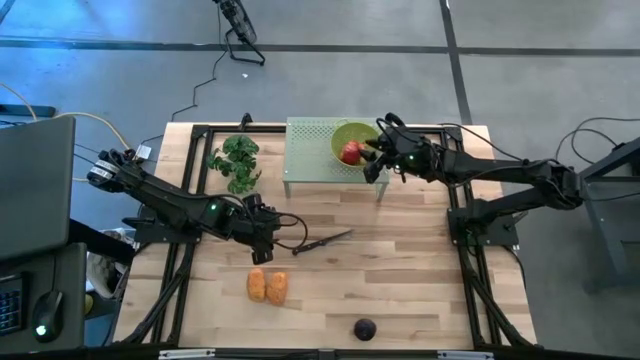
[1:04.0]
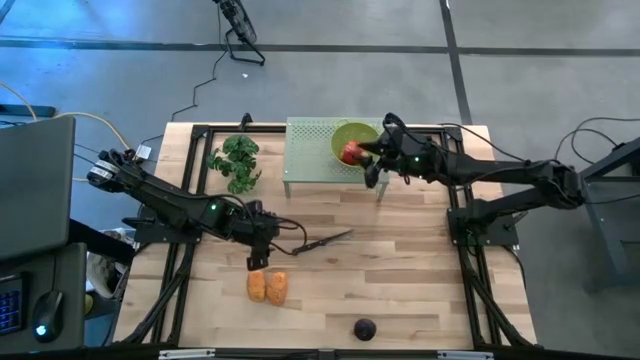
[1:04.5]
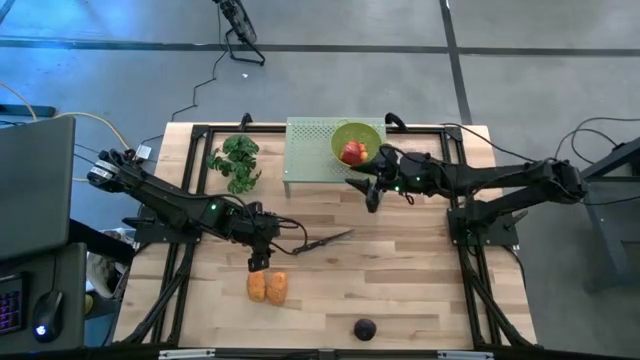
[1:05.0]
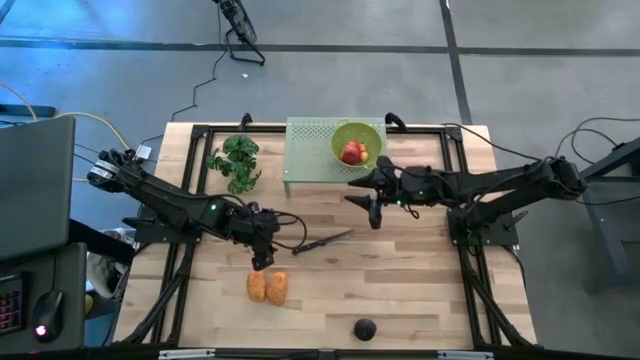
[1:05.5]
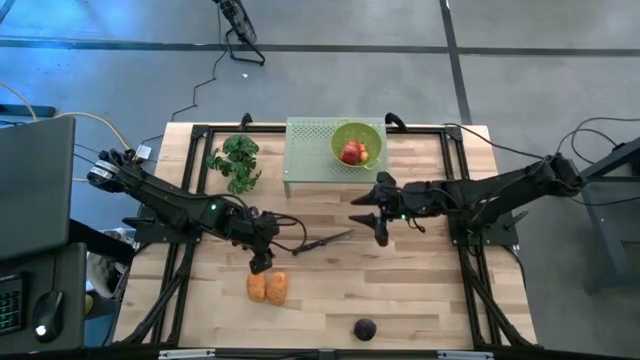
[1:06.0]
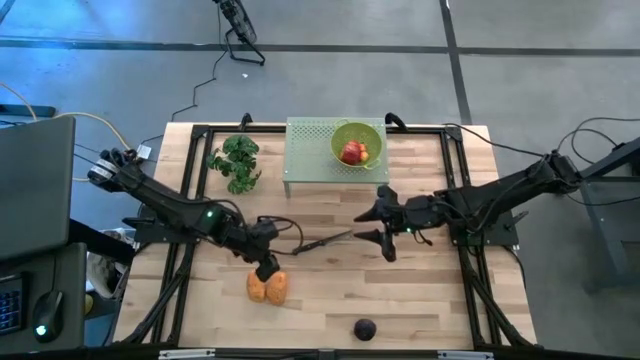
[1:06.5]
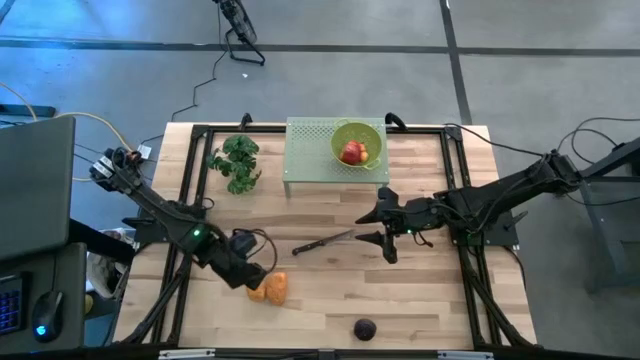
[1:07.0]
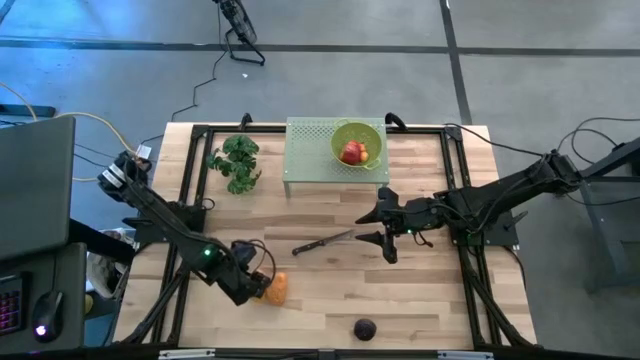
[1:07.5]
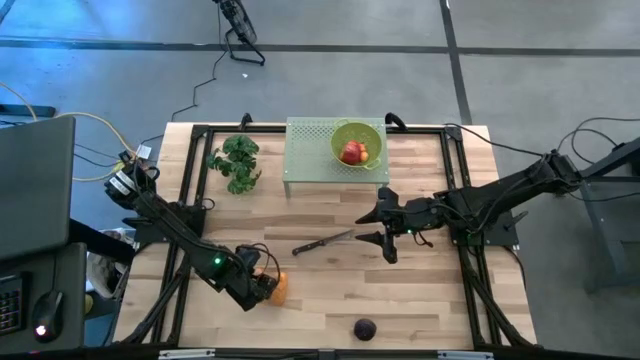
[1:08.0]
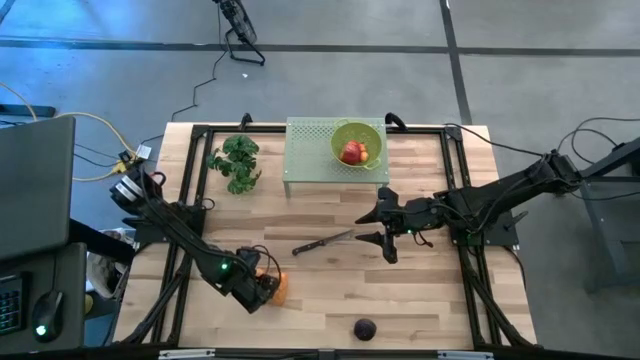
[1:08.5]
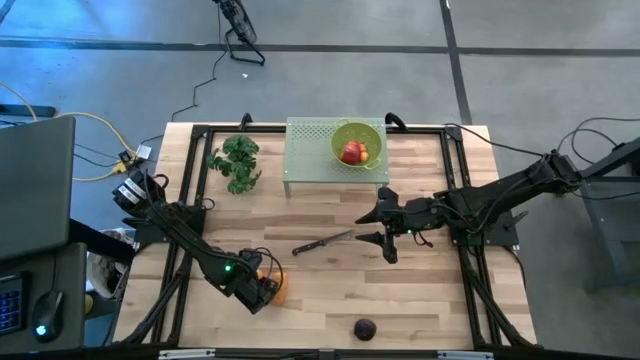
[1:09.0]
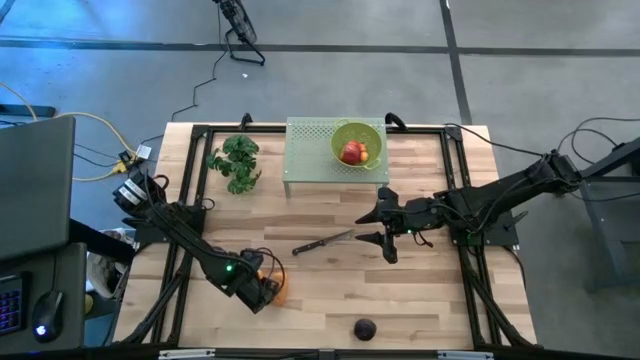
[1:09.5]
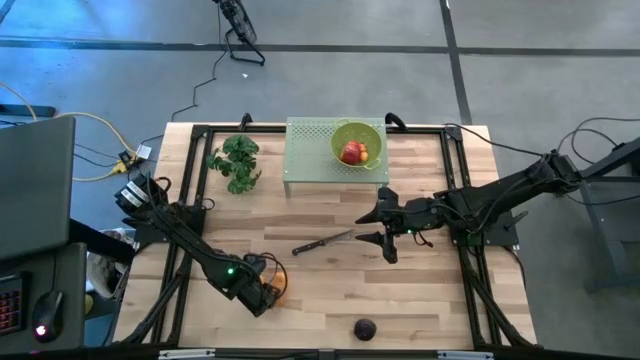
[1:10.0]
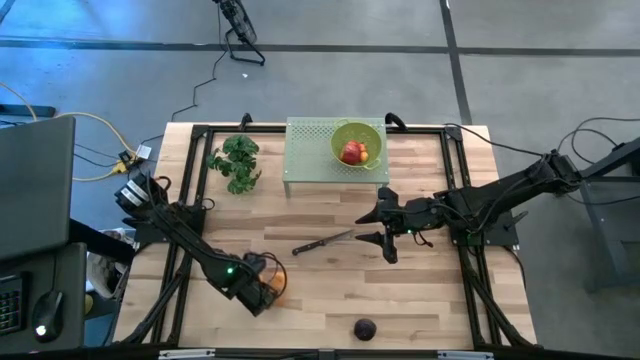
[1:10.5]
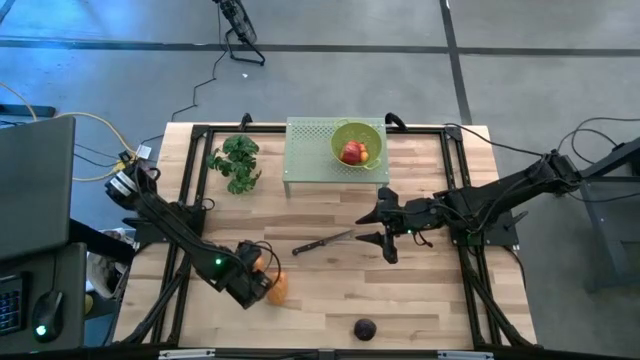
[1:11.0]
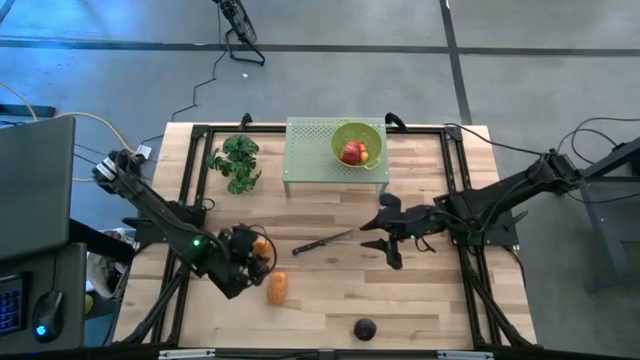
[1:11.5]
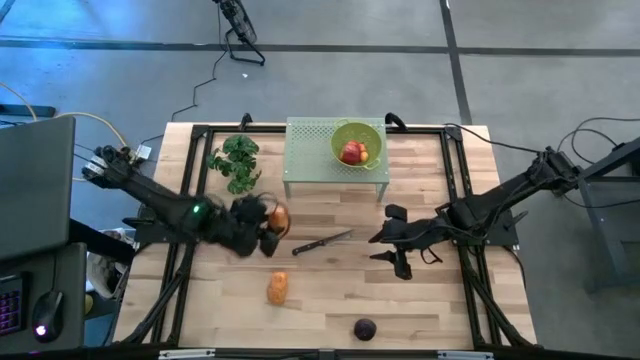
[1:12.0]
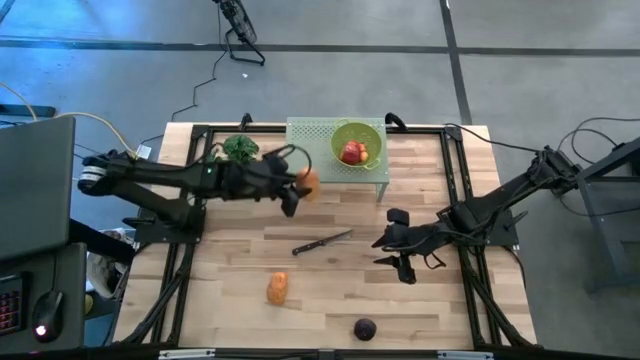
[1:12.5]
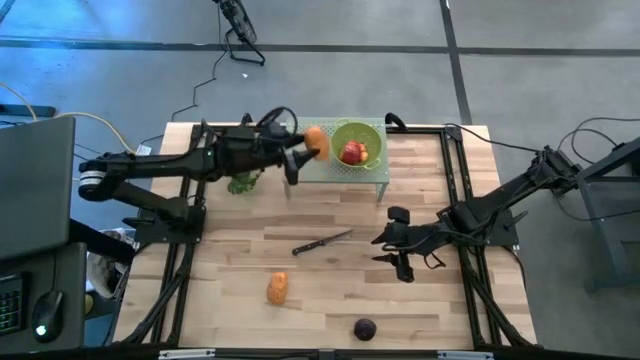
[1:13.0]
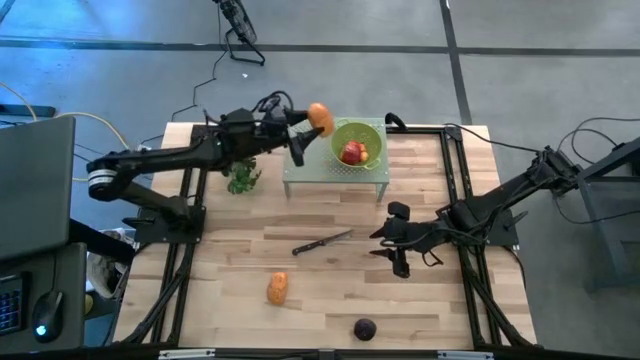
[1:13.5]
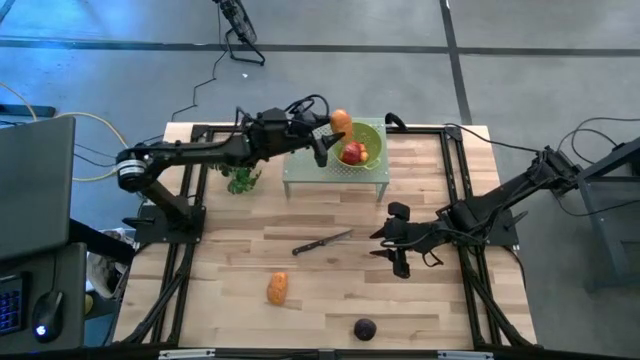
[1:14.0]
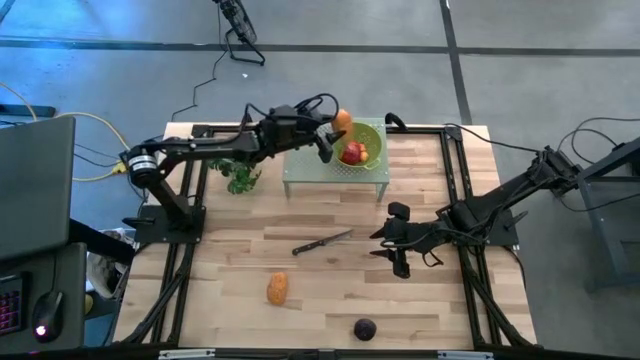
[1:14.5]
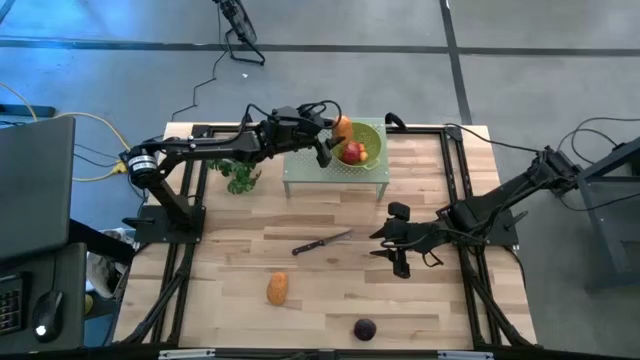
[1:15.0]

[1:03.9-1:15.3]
Task: Pick & Place Fruit
Put the yellow mango into the green strainer bowl on the shelf

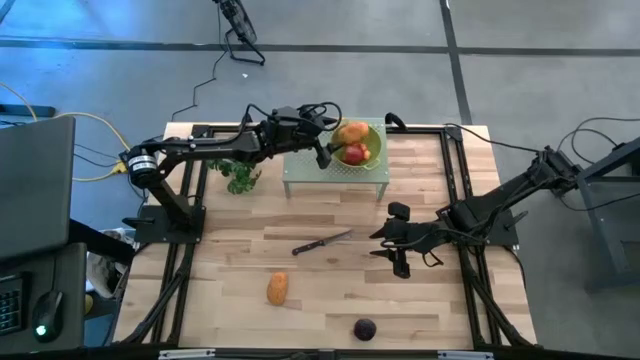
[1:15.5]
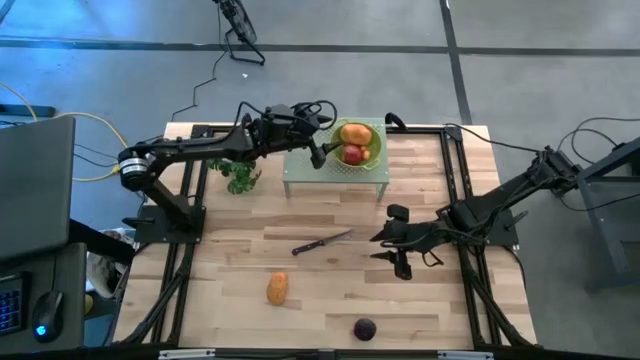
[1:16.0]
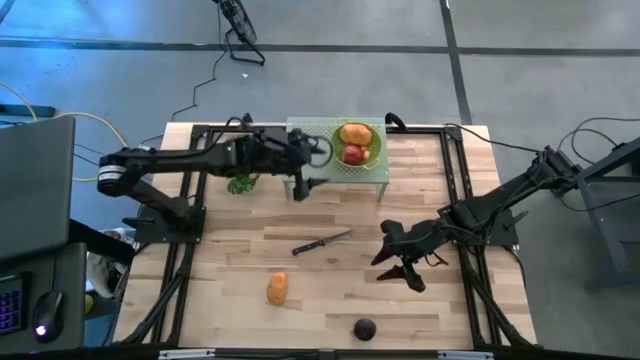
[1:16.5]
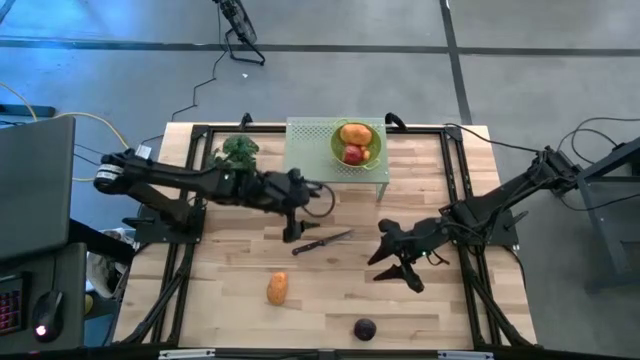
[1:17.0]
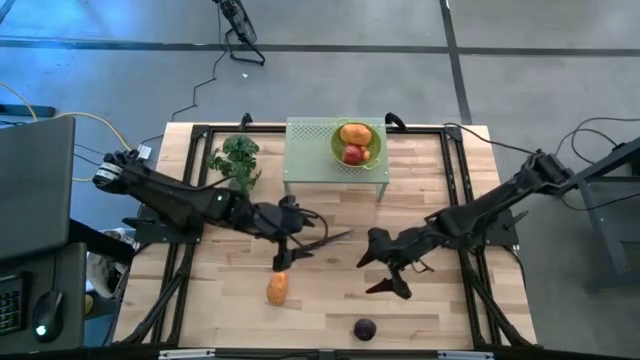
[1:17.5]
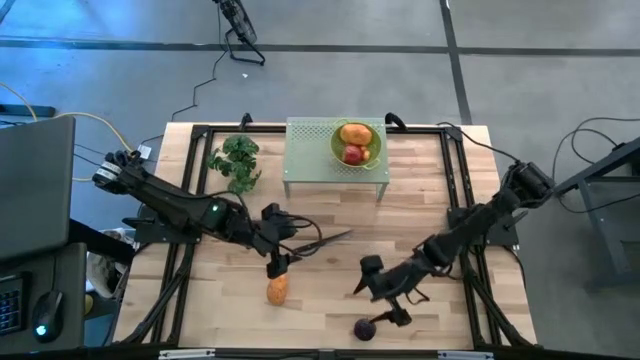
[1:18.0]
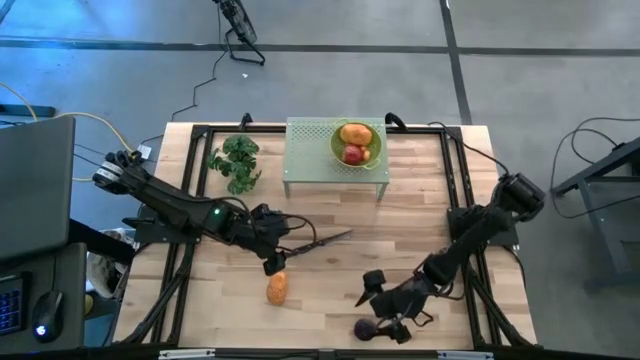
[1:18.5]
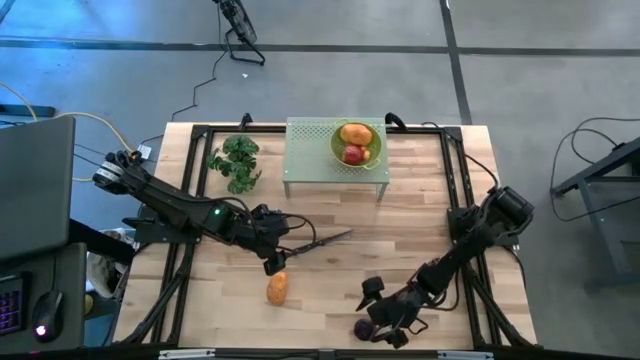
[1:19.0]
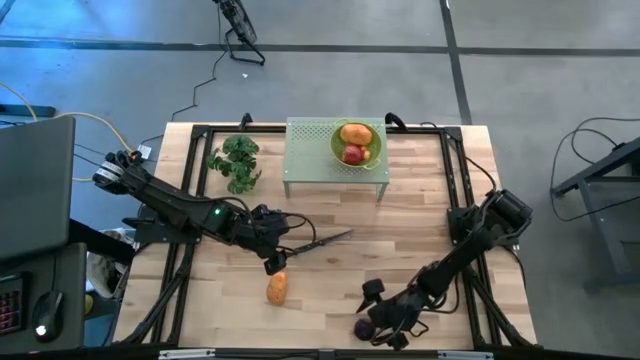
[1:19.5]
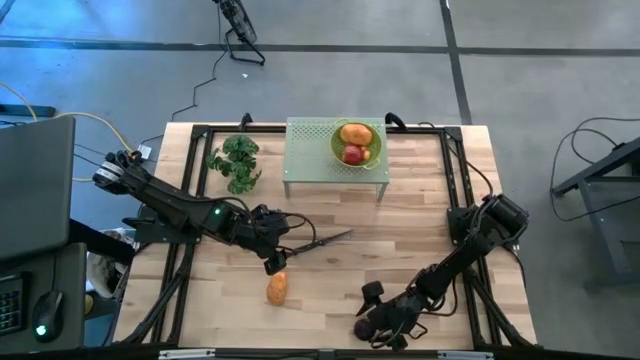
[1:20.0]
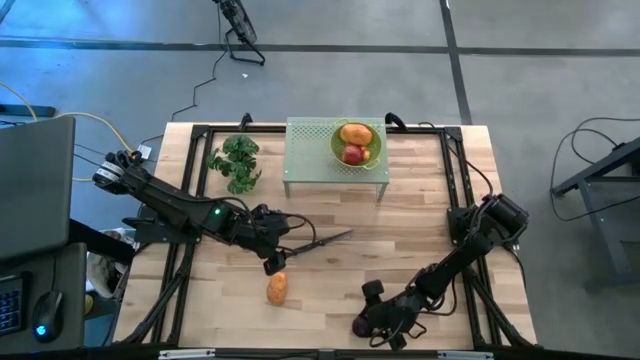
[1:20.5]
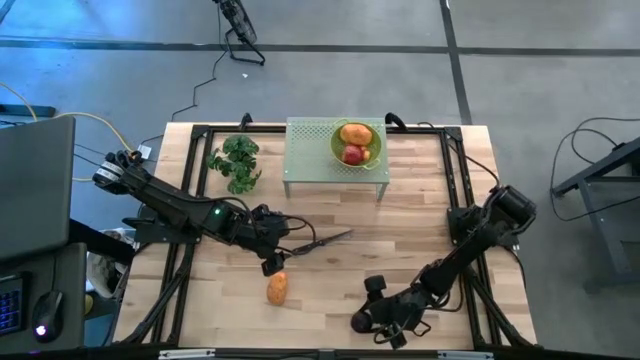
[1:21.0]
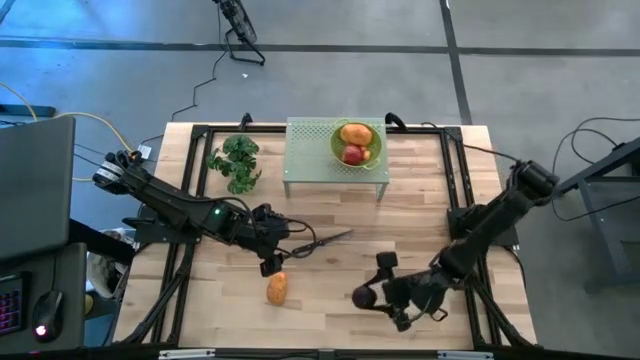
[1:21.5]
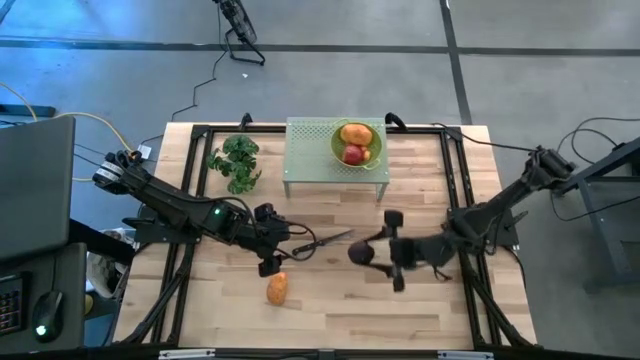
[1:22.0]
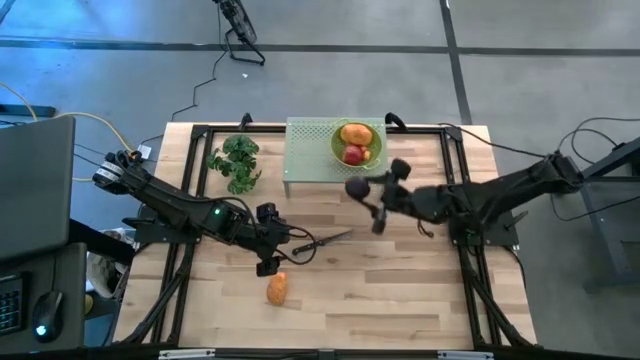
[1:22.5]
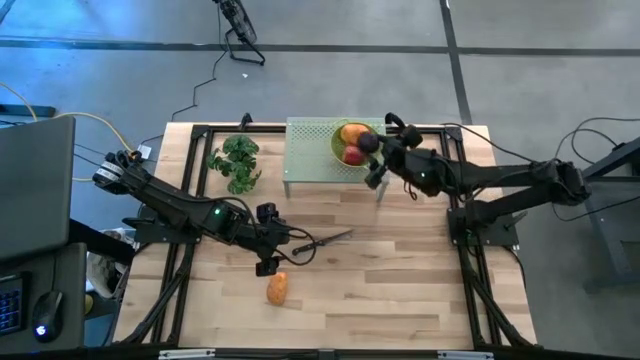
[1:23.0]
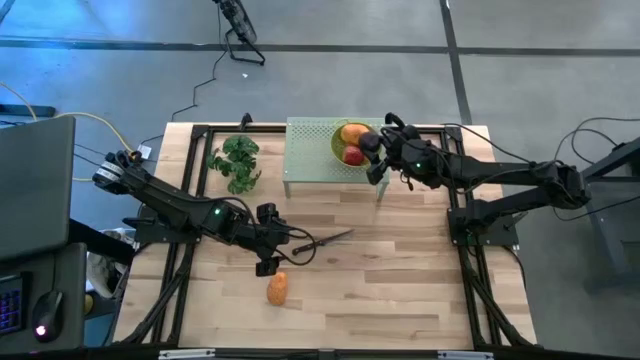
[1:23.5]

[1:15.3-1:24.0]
Put the purple plum into the green strainer bowl on the shelf

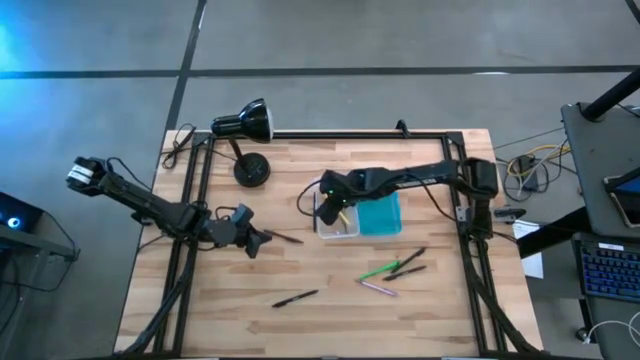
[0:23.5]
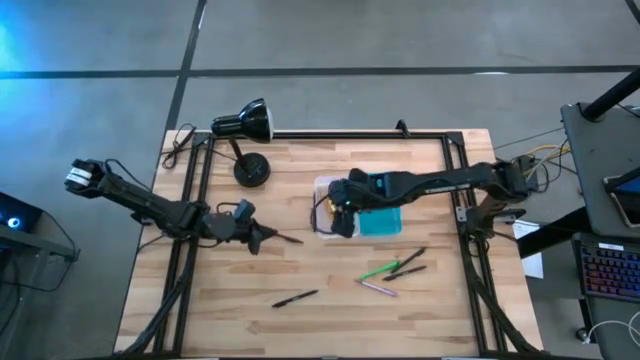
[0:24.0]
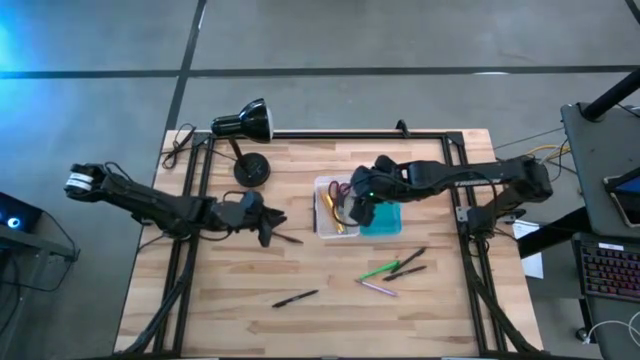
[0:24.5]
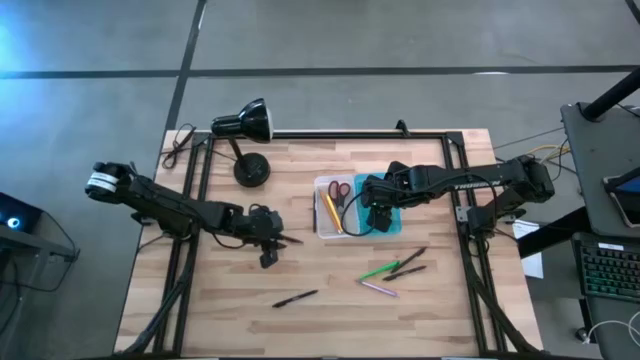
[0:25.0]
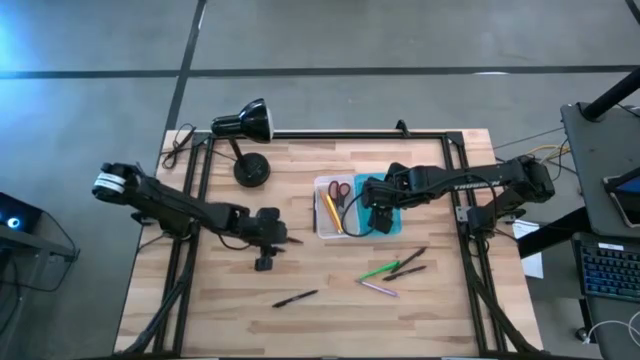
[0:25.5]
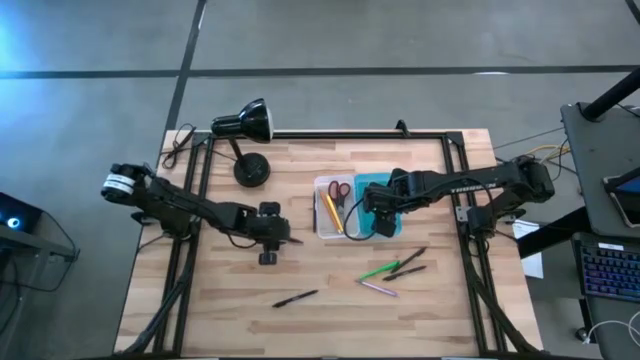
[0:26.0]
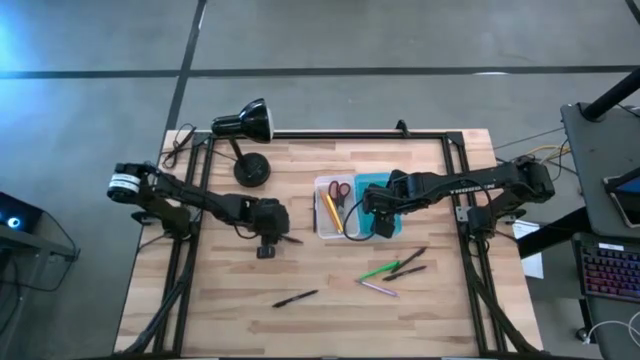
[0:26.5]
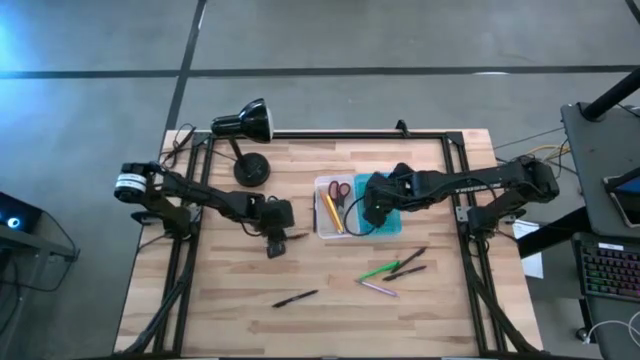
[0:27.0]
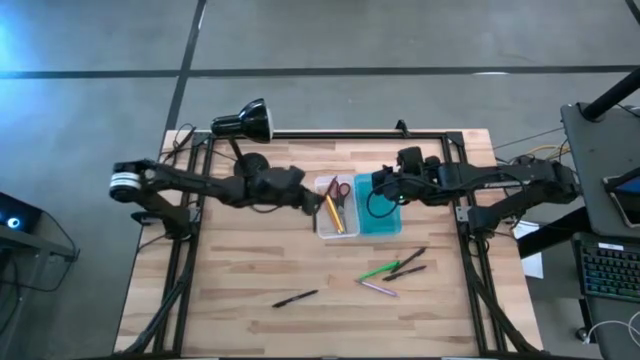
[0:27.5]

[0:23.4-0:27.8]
Task: Pick & place school supplies into a supply box
Put the brown pen into the blue supply box
